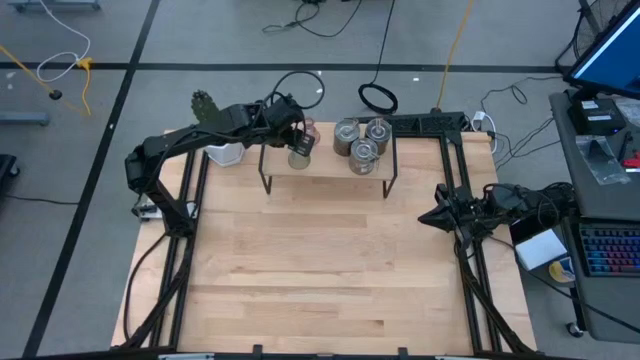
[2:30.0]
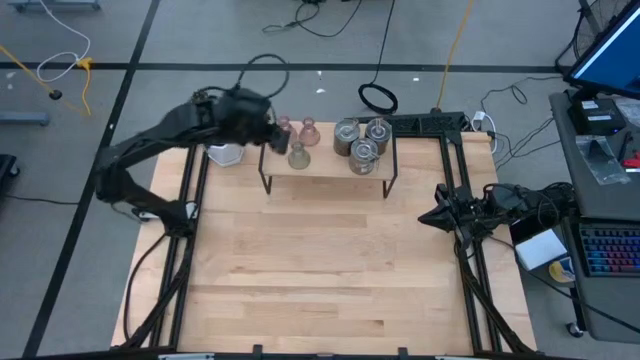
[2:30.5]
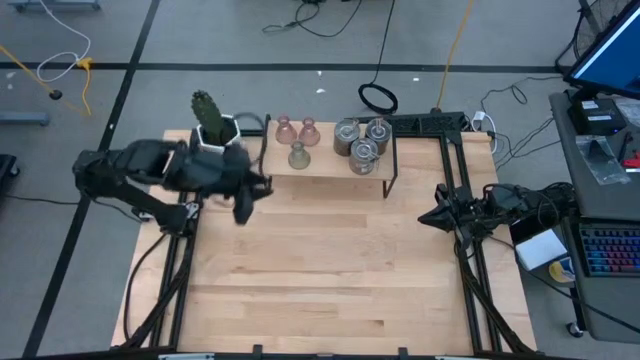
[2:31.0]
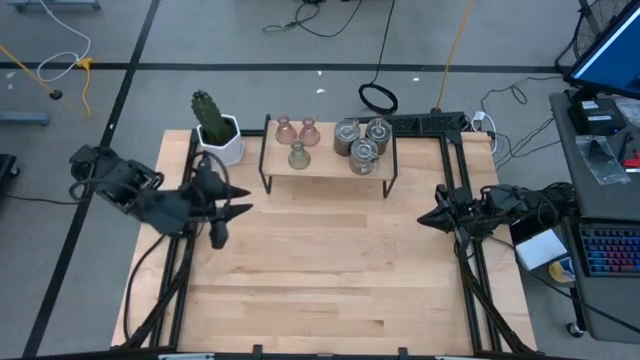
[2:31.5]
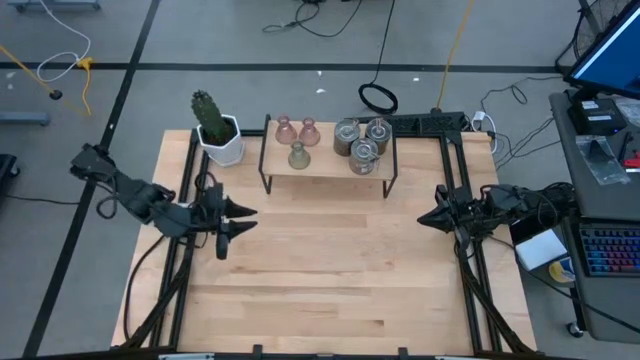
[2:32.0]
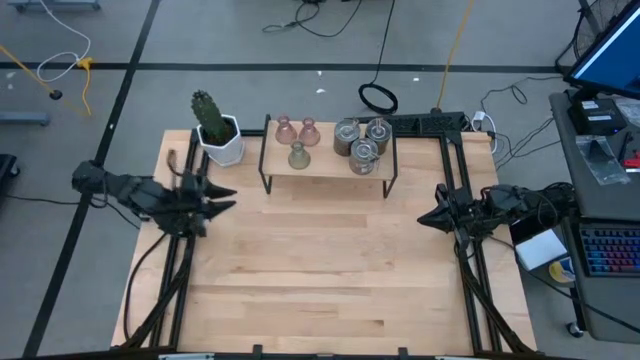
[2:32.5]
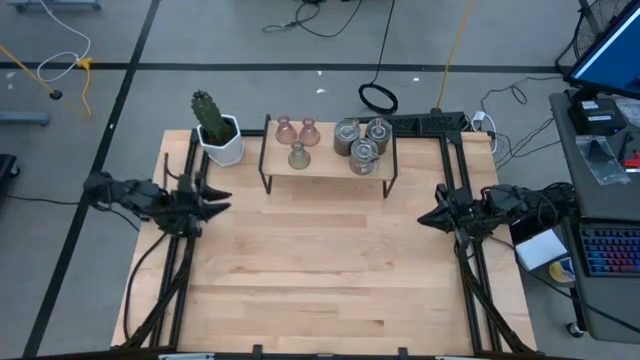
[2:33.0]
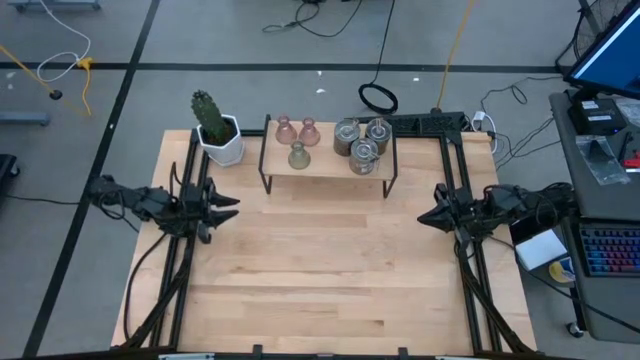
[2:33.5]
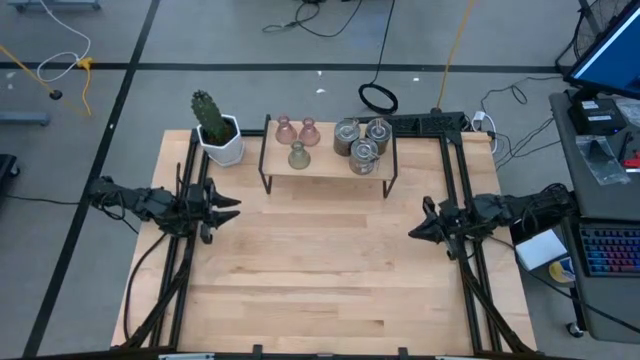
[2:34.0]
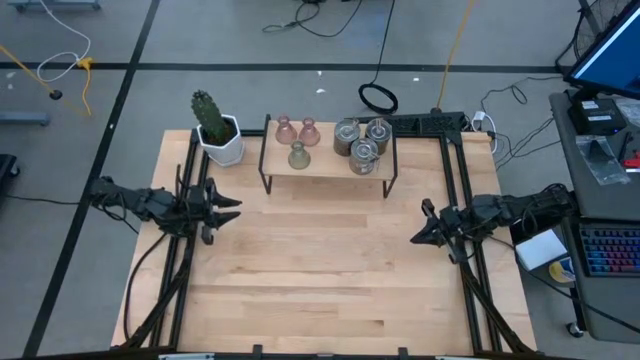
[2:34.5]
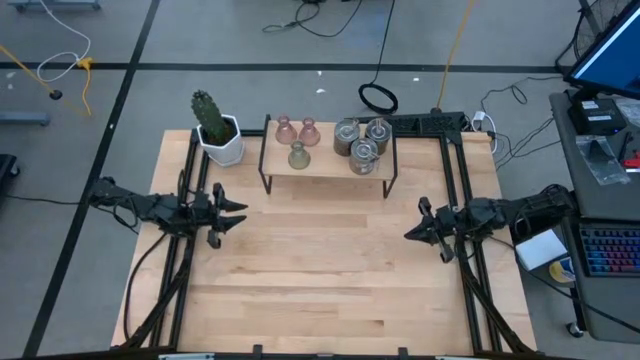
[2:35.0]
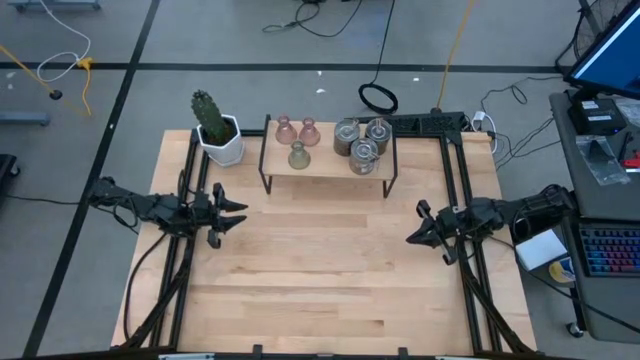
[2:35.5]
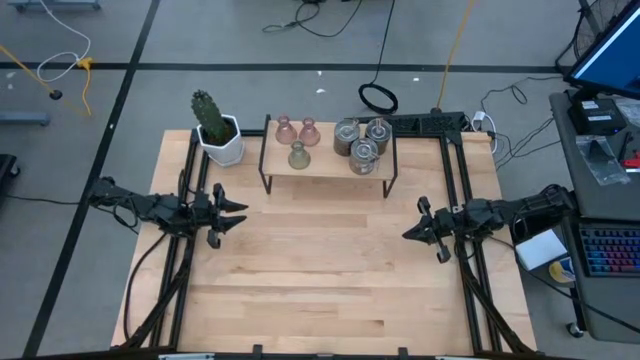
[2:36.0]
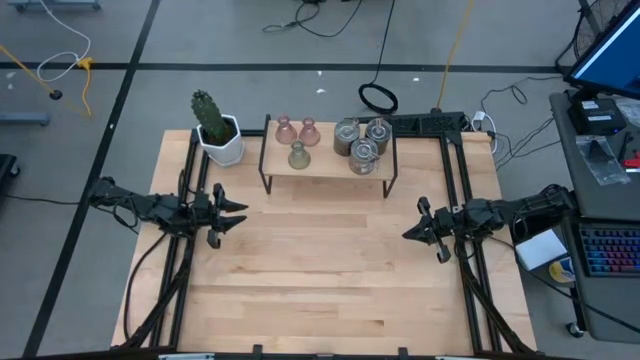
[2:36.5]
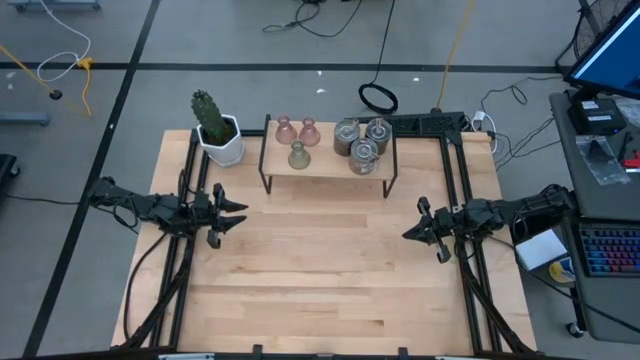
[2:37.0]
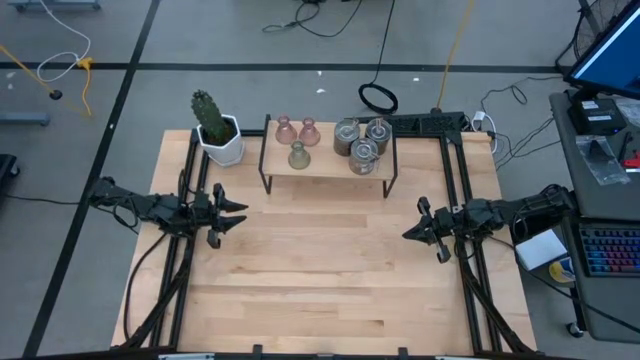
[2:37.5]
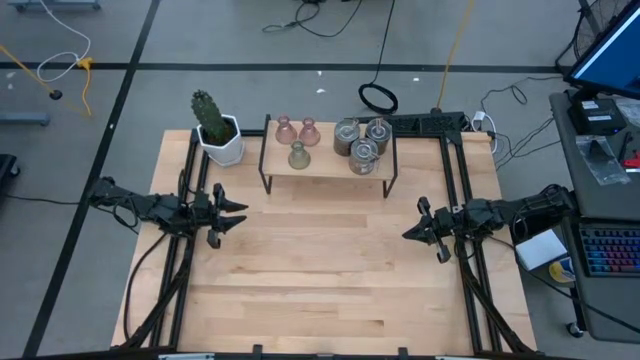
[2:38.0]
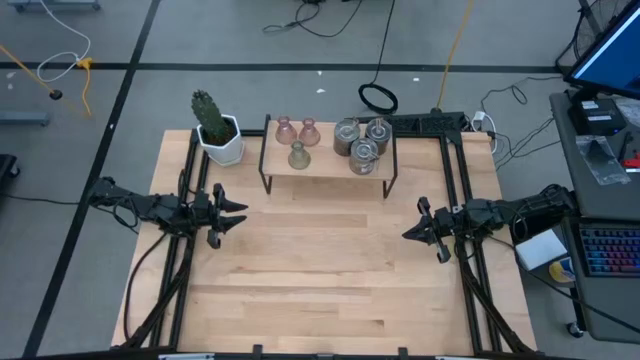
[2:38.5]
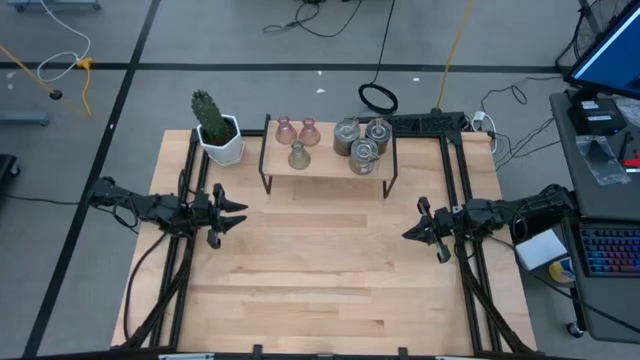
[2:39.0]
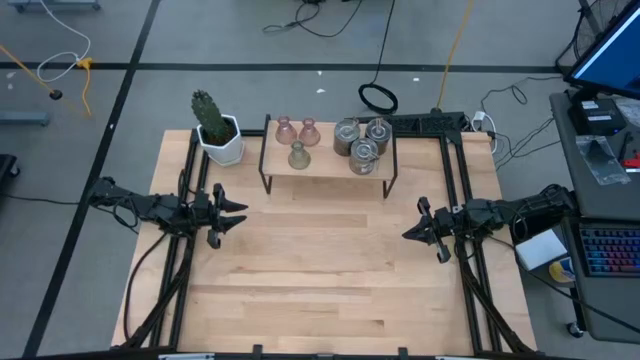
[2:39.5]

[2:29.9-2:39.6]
Task: Pick & Place candle stick holders
Return to Home Position

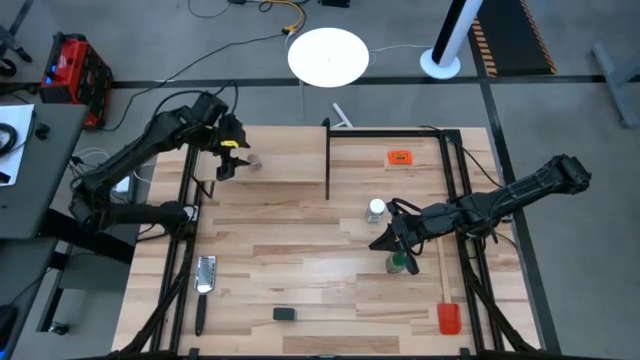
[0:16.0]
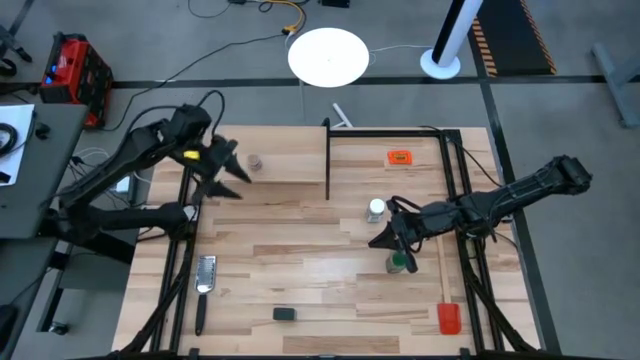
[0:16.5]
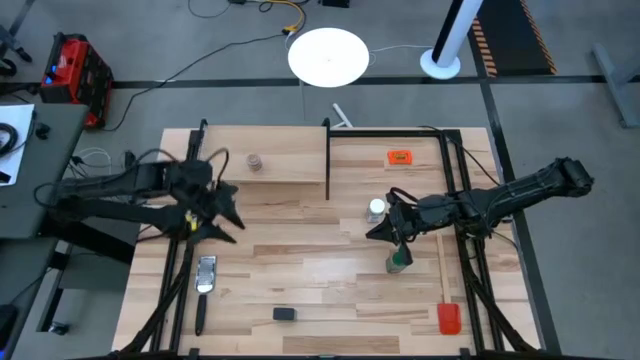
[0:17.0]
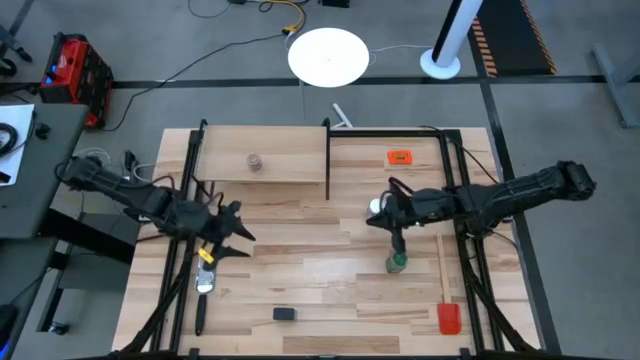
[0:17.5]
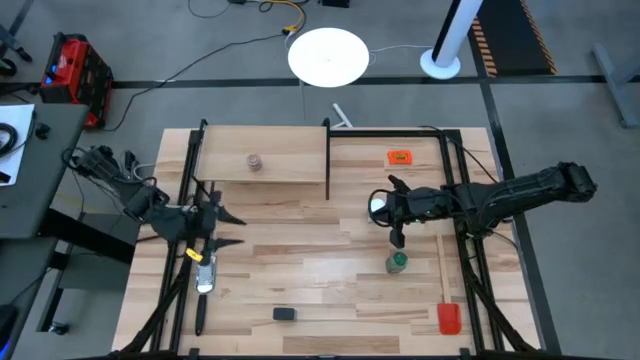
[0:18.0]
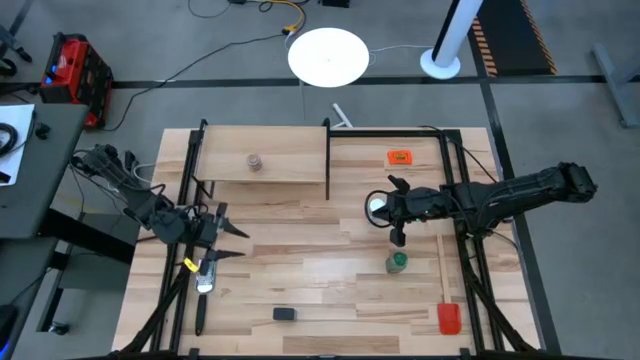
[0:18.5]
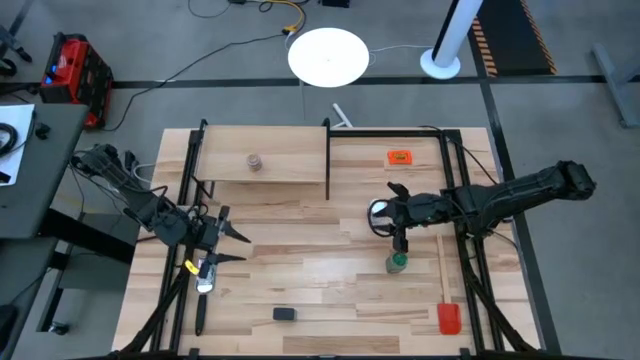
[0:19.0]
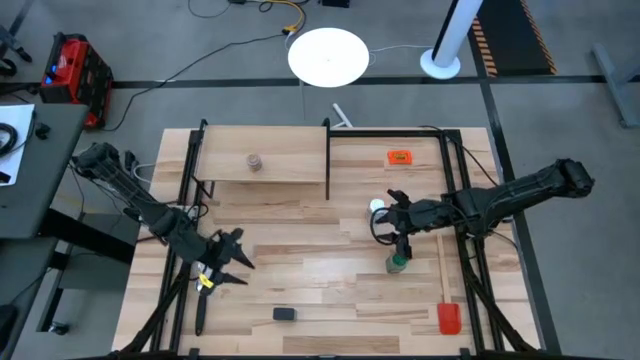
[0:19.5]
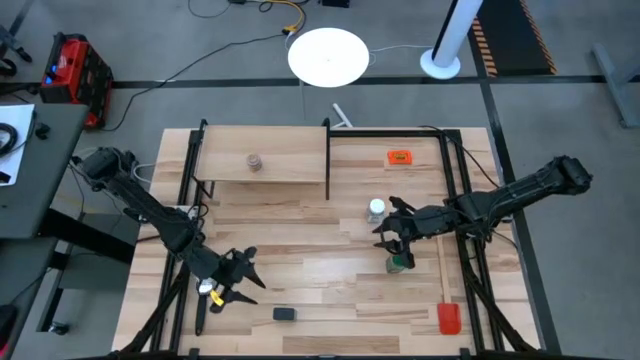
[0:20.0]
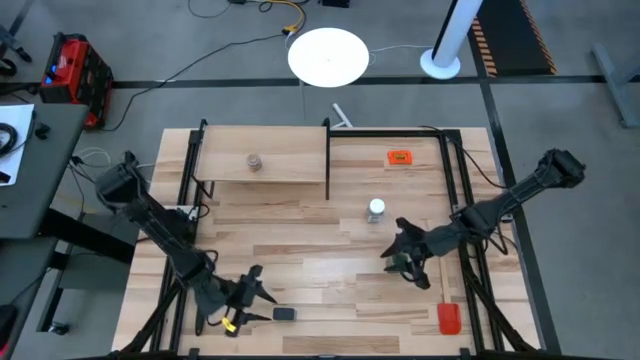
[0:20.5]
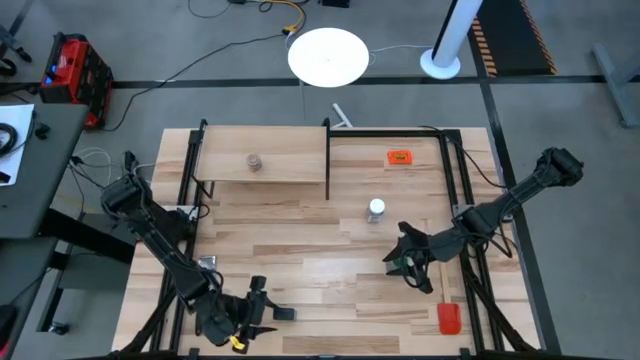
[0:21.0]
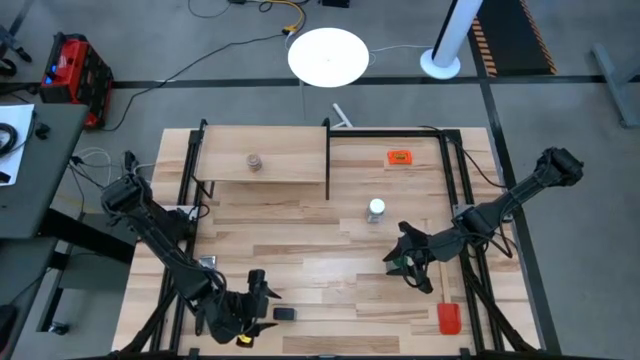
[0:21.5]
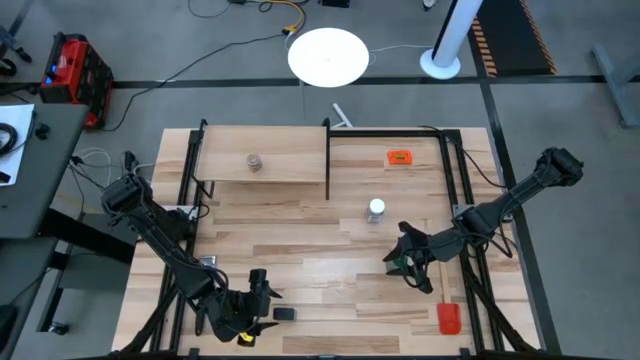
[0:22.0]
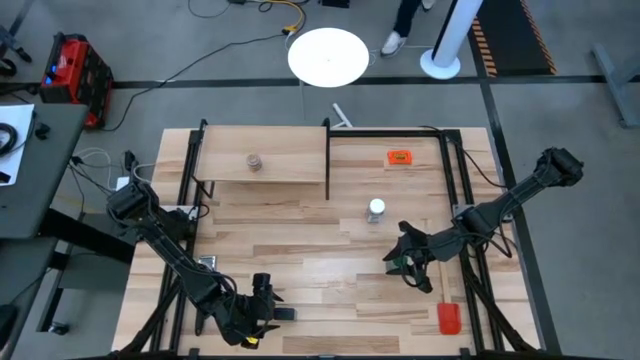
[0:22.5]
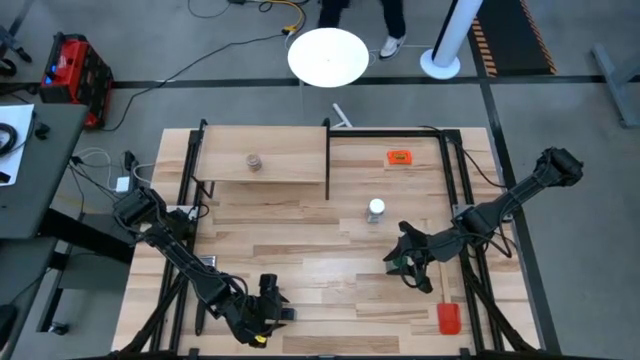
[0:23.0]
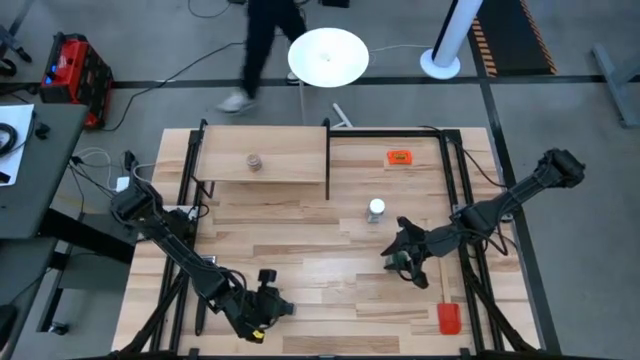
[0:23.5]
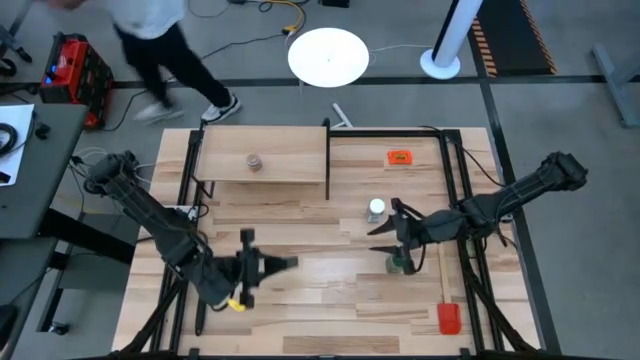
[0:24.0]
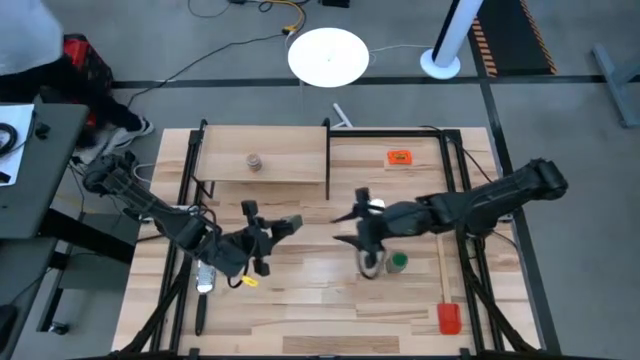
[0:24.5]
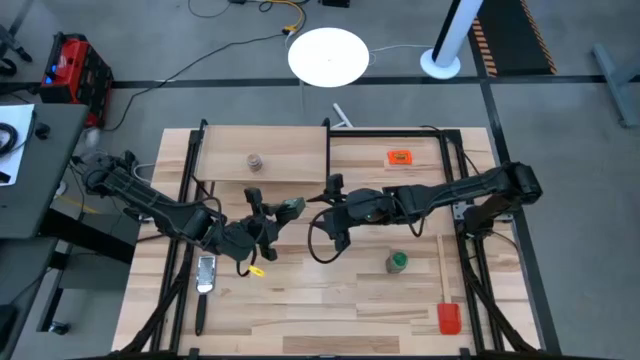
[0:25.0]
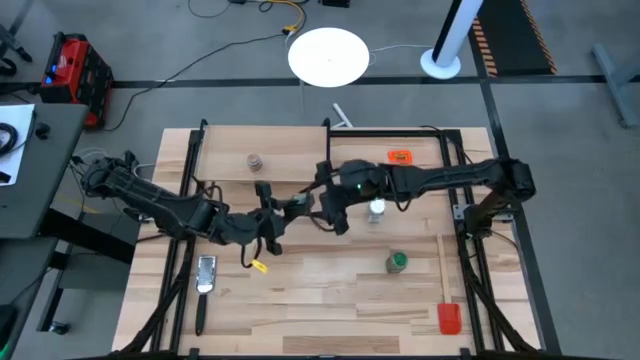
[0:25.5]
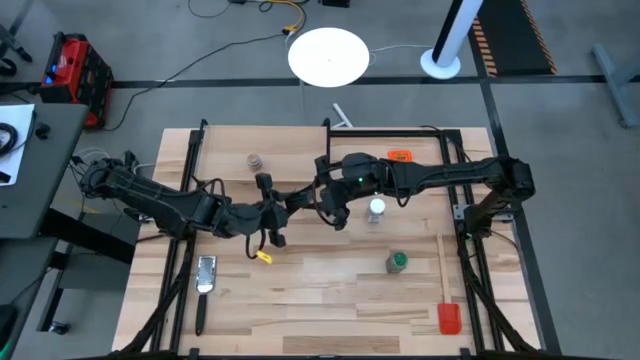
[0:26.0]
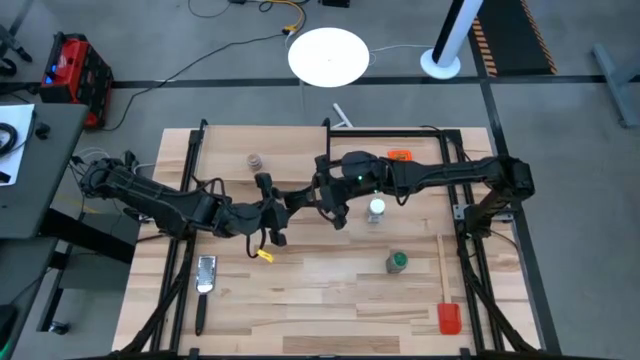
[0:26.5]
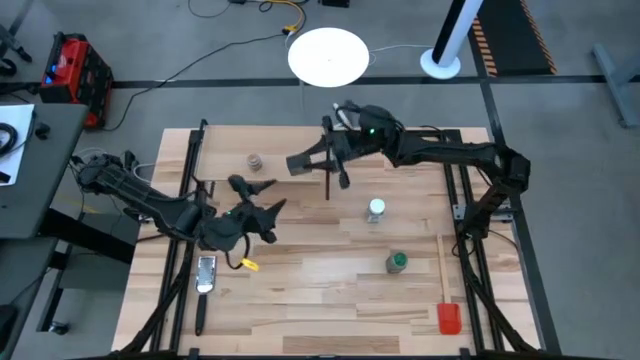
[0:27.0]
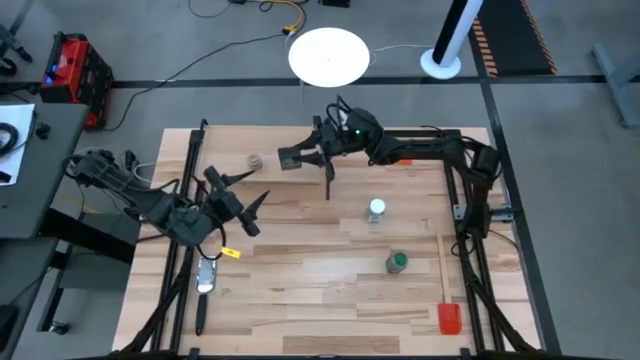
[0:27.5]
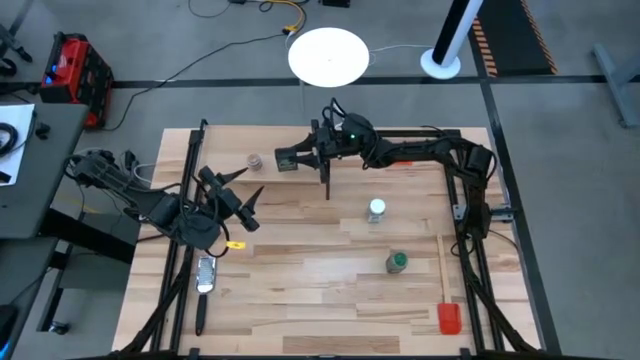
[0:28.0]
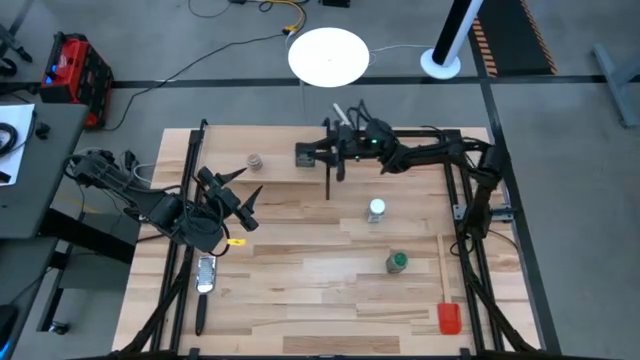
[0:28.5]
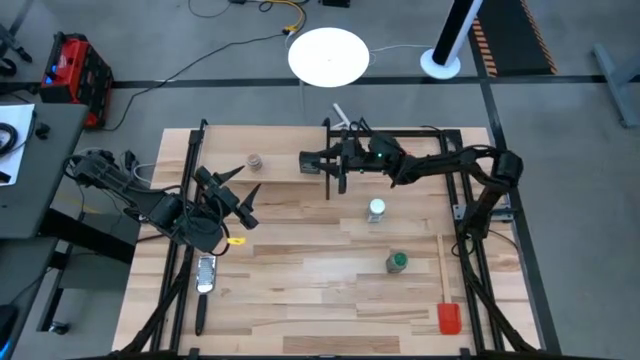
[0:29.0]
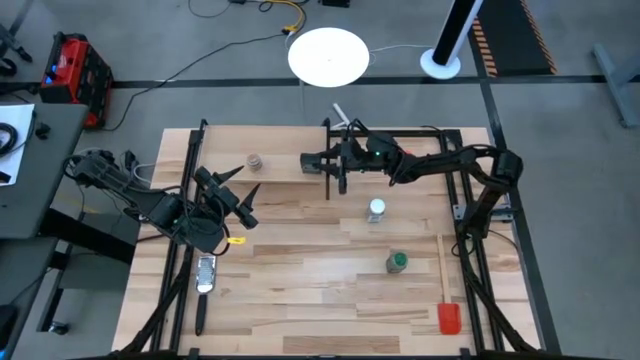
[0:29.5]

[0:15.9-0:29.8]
Task: Shelf spices
Put the black seasoning can on the shelf
